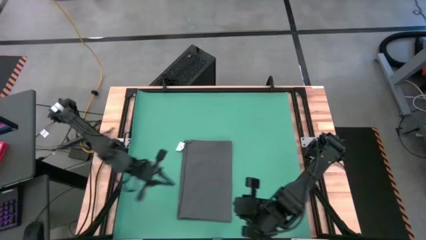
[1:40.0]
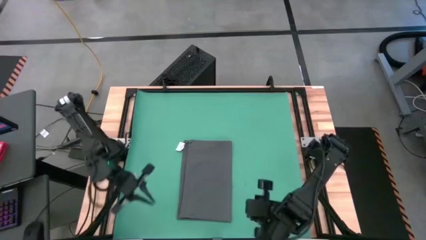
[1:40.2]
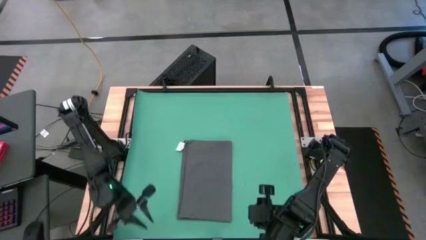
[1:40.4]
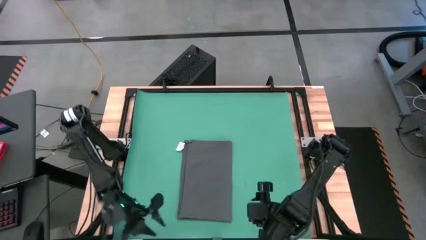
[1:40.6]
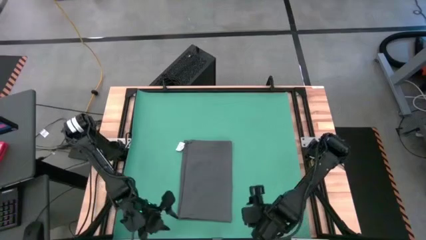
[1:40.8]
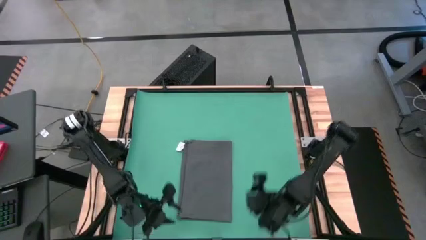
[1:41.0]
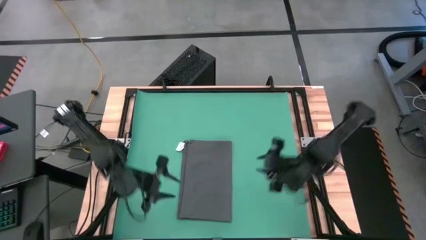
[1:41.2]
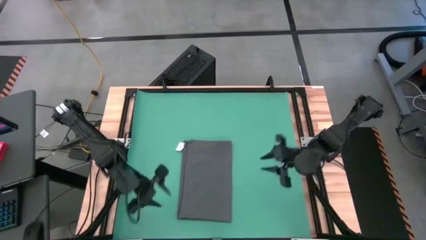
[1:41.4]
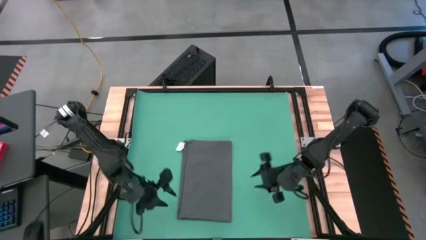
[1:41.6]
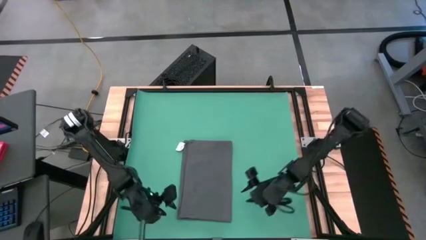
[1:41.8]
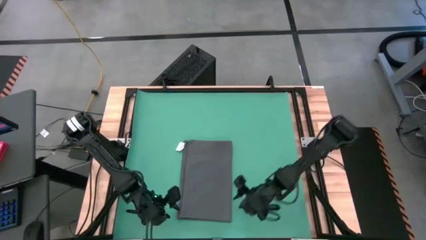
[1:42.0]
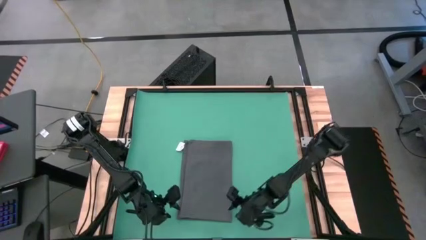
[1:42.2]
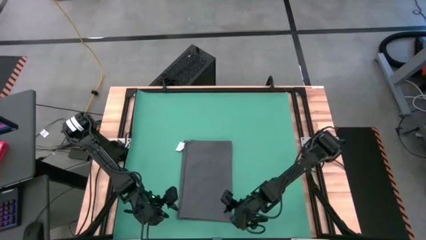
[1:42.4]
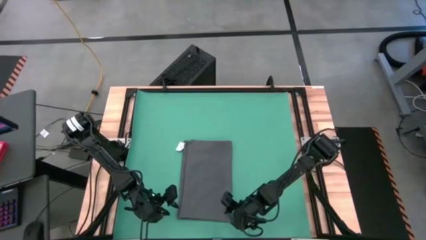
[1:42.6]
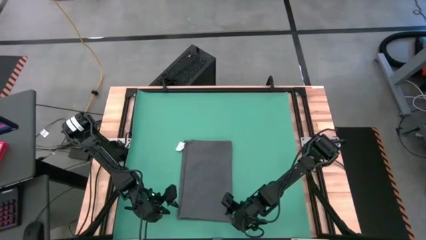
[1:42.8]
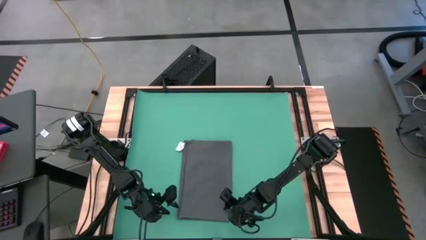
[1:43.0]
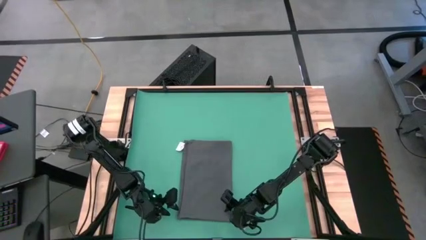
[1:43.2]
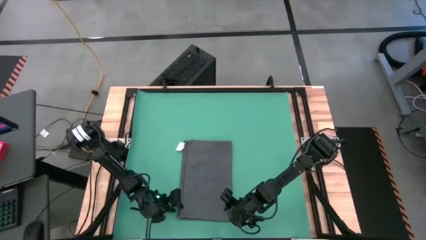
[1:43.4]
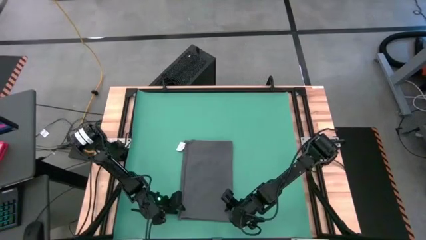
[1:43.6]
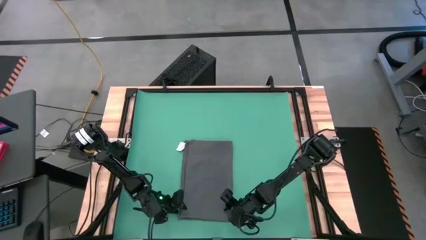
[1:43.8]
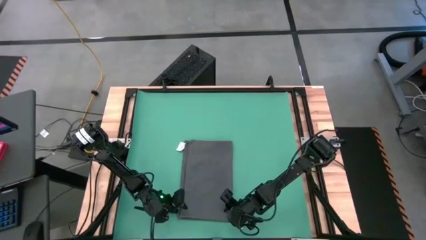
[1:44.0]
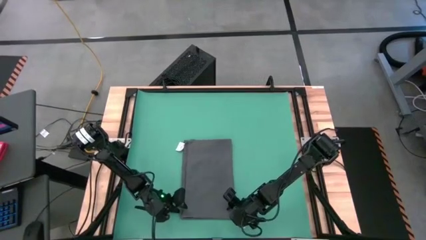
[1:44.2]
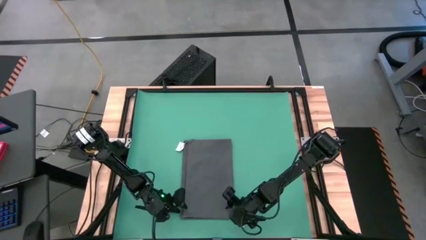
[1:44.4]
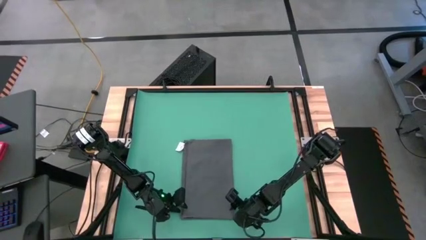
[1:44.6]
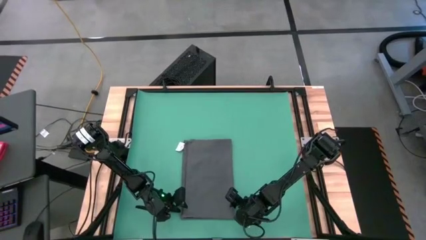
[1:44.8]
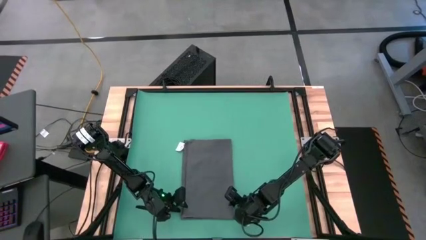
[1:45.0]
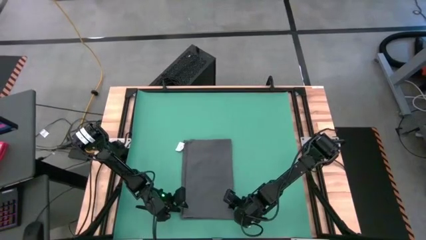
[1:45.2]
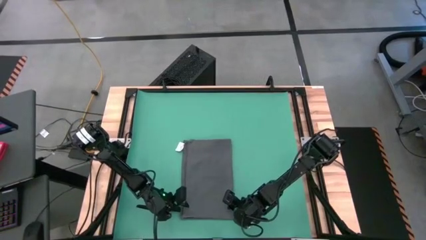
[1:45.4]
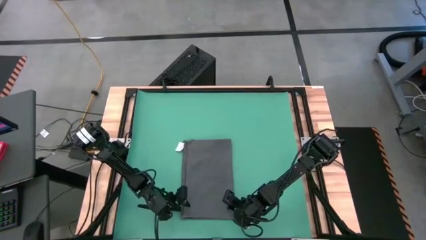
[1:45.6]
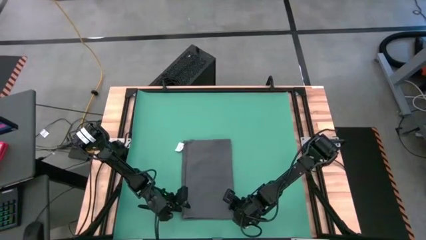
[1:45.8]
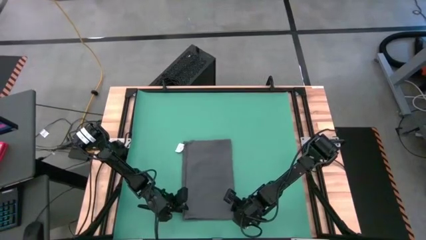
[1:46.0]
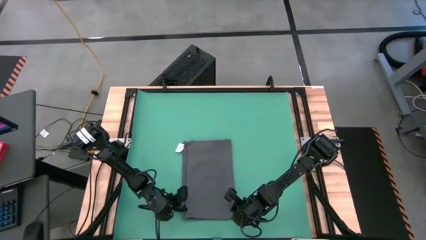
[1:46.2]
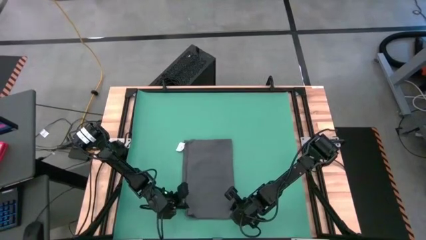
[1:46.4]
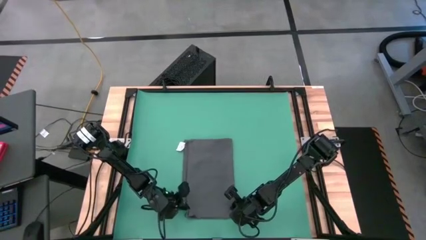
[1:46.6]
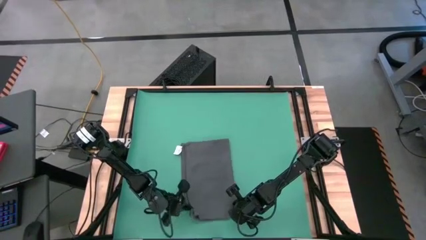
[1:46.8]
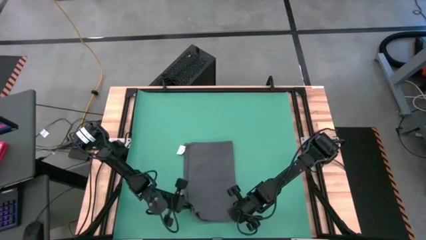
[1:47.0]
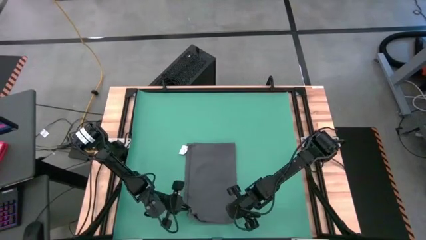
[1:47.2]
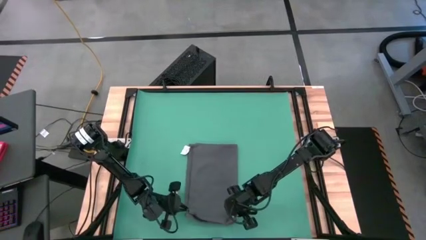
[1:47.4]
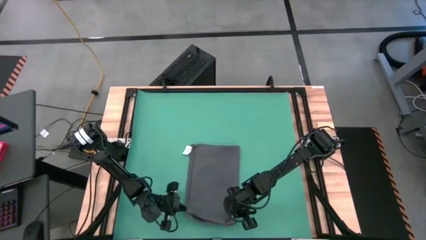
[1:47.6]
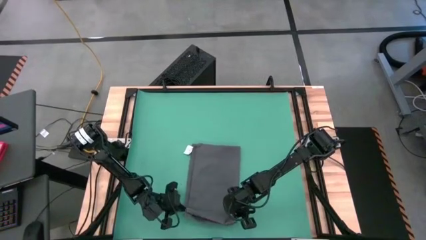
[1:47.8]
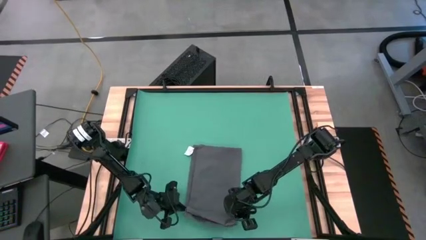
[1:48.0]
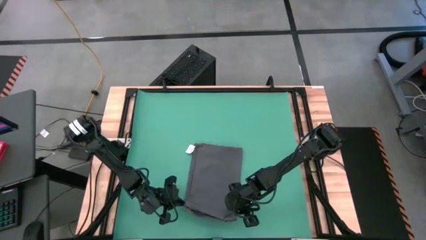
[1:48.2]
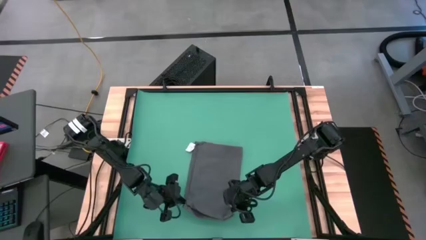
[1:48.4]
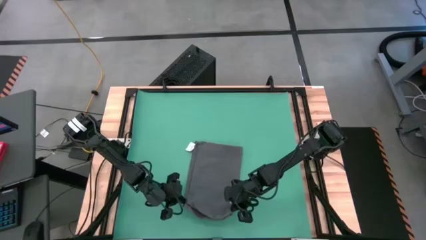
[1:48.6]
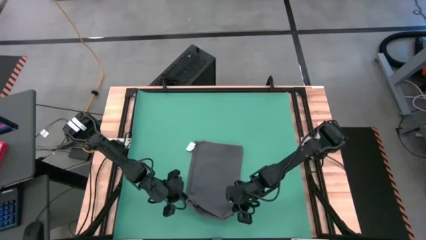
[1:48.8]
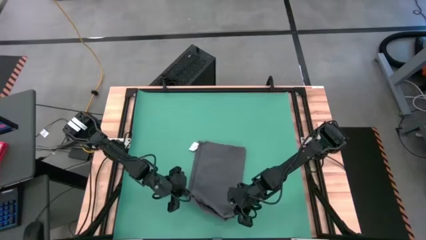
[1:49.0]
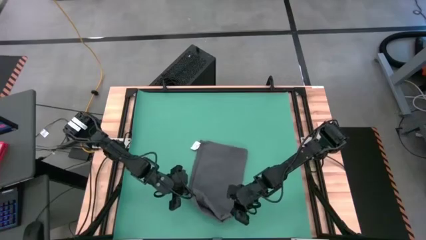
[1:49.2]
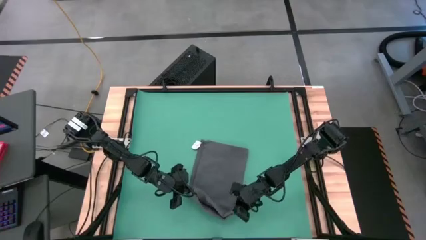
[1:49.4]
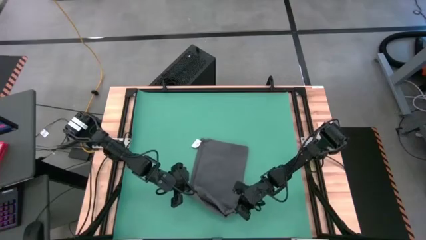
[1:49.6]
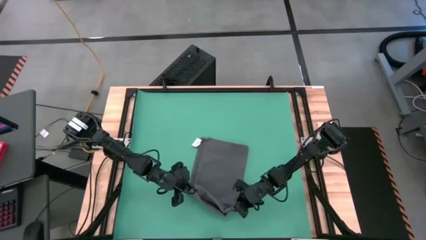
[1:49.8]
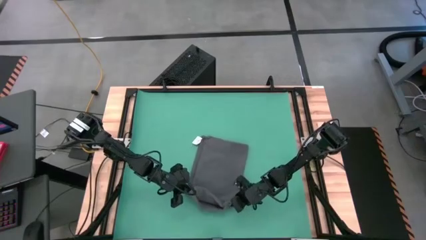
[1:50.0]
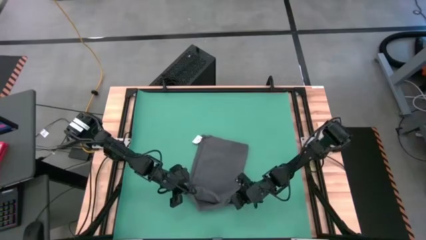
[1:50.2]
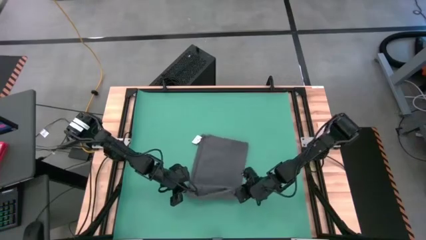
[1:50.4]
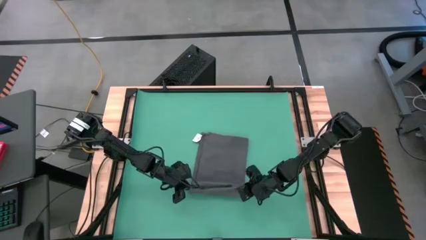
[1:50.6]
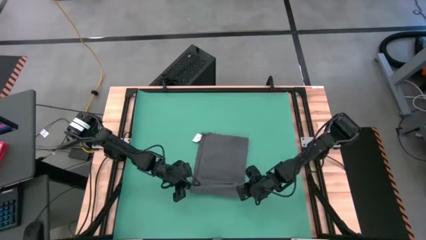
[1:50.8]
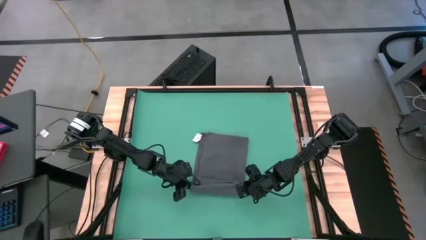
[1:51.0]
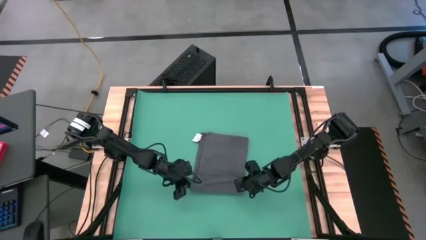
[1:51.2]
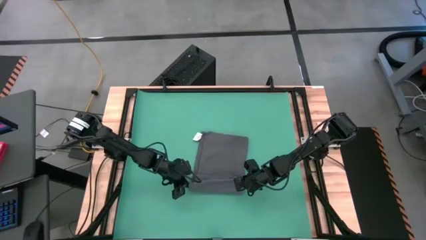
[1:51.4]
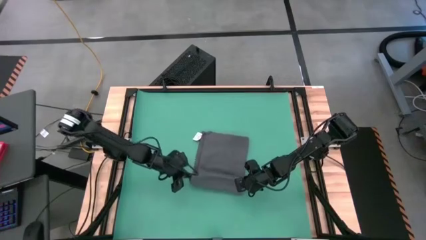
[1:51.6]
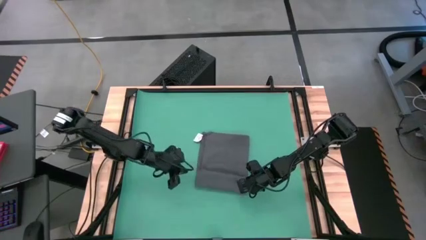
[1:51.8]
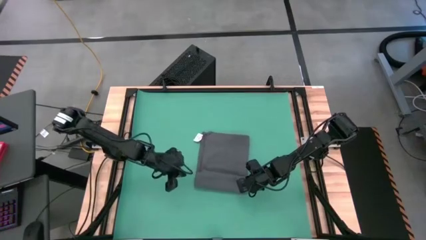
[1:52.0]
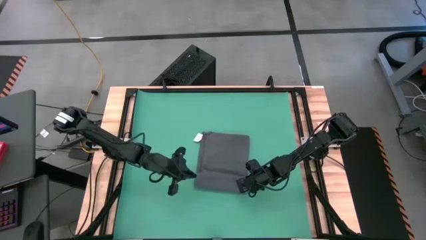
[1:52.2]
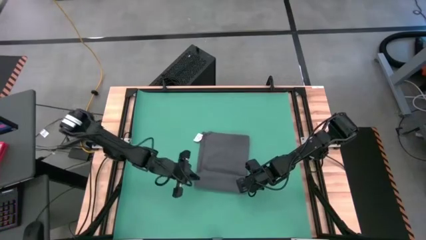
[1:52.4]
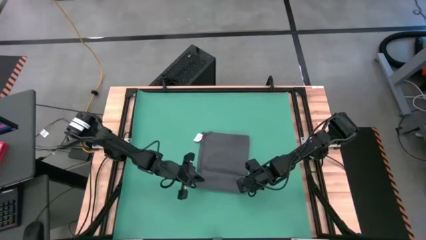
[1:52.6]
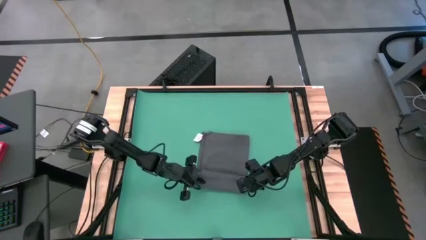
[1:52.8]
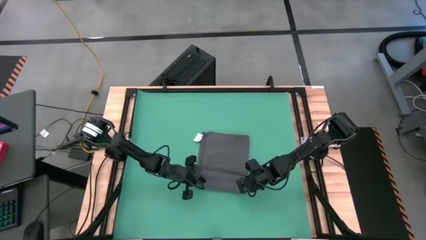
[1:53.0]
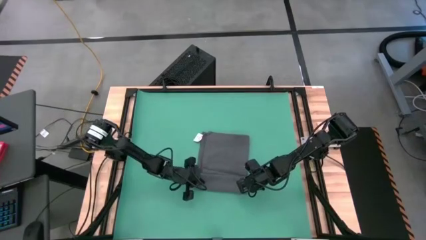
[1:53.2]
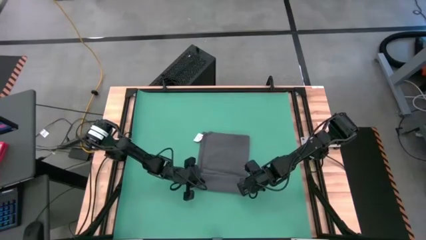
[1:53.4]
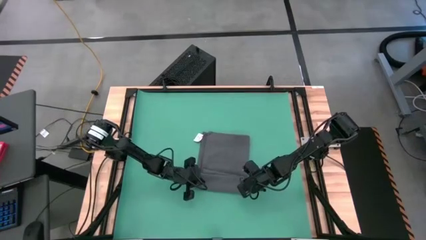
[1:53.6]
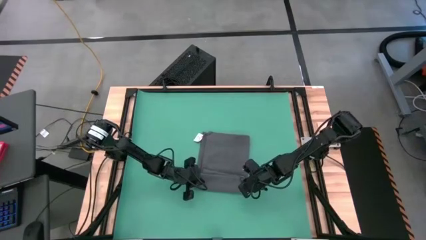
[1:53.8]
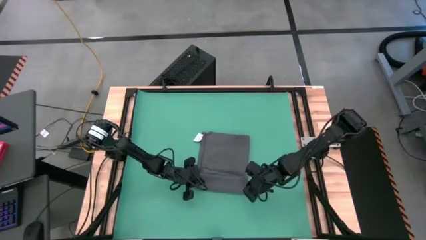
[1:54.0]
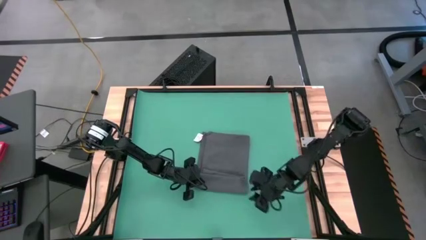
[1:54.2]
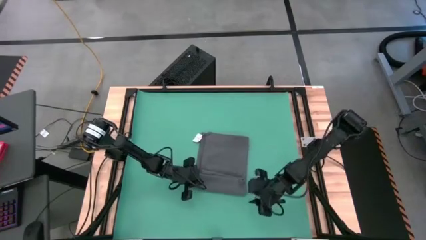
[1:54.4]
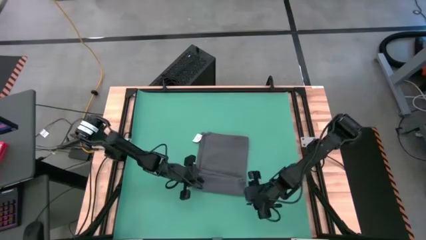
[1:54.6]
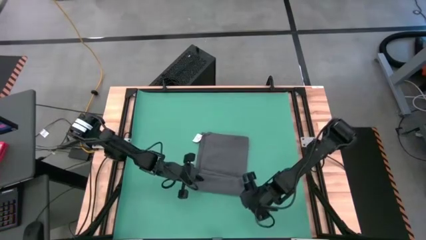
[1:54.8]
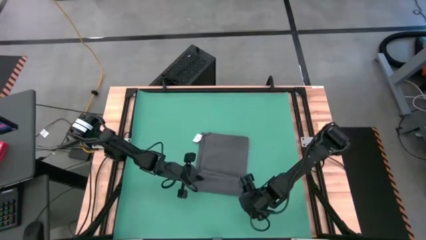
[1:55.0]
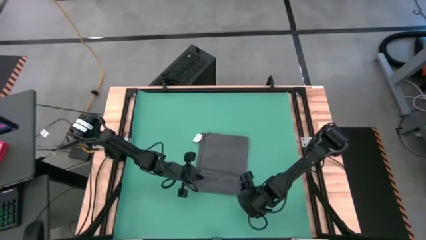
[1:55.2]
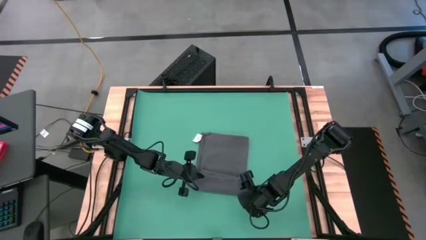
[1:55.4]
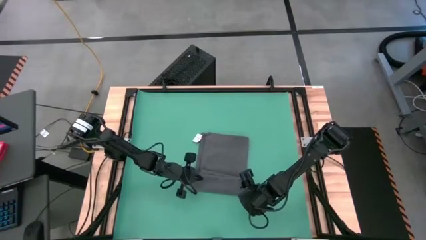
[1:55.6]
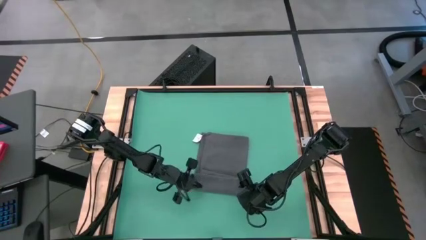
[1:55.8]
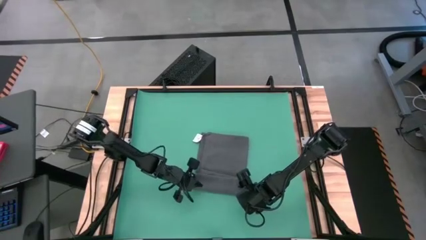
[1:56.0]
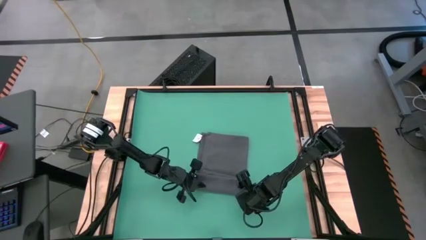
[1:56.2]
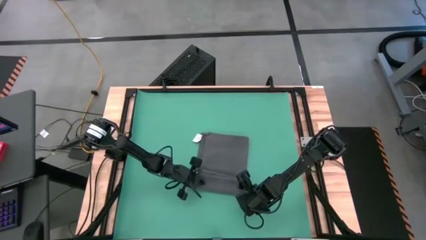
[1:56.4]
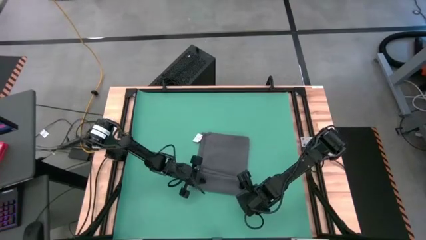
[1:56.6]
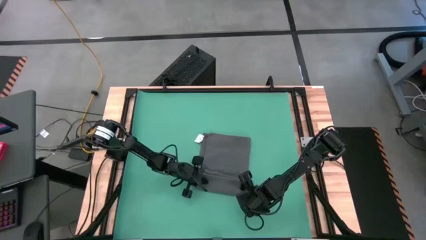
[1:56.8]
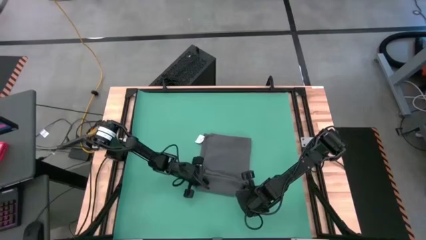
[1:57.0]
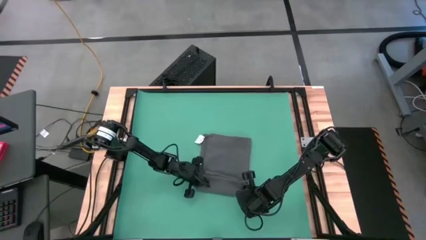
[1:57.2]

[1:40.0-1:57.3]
Task: Roll towel
Roll the gray towel on the table
